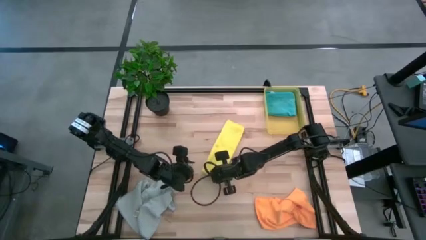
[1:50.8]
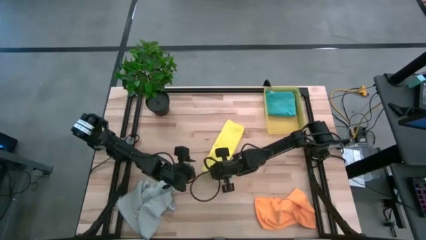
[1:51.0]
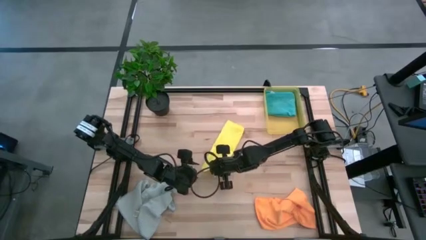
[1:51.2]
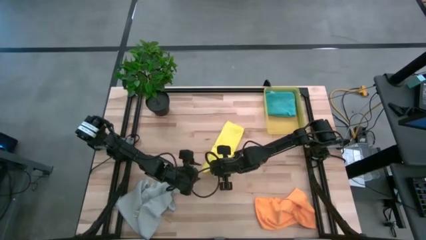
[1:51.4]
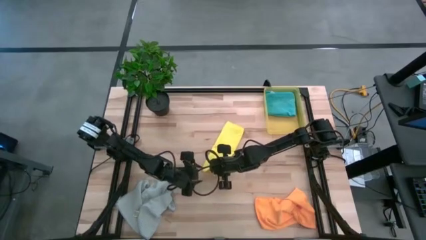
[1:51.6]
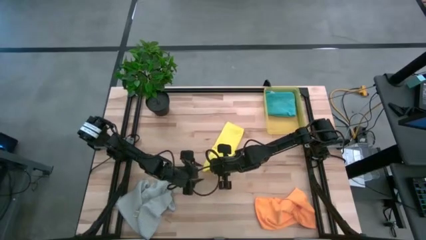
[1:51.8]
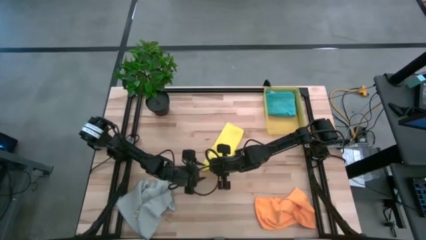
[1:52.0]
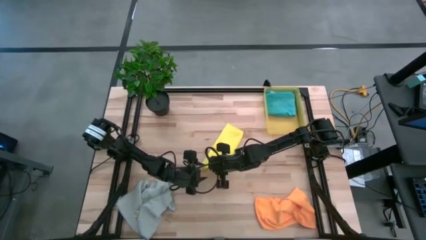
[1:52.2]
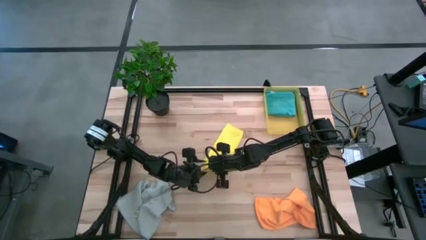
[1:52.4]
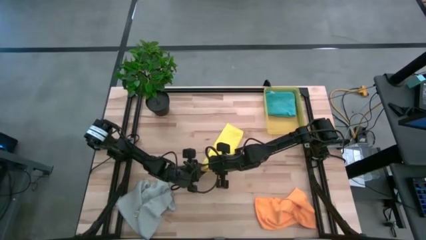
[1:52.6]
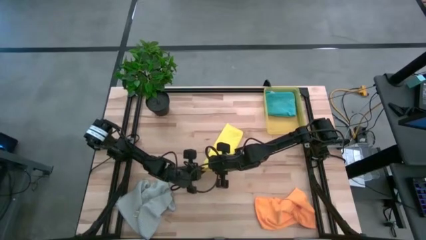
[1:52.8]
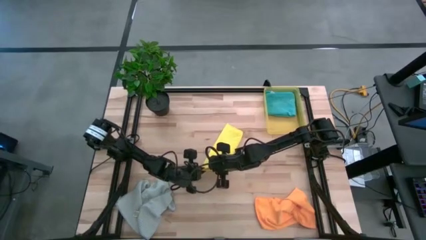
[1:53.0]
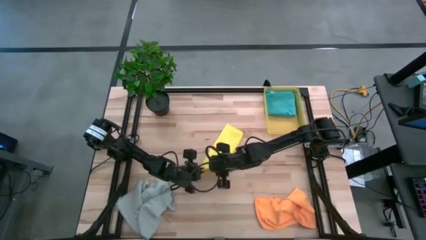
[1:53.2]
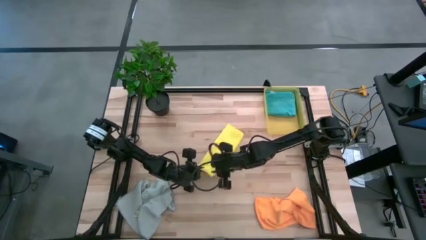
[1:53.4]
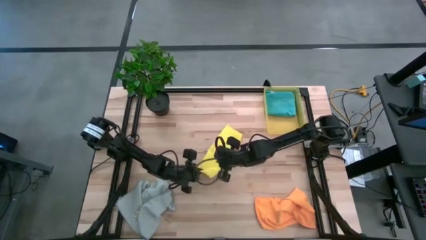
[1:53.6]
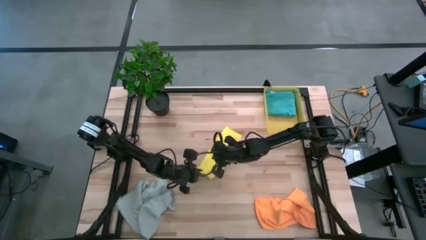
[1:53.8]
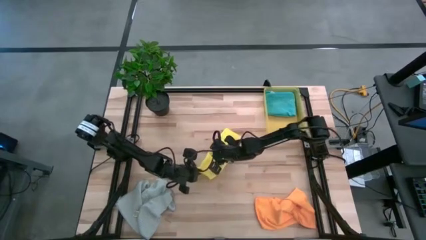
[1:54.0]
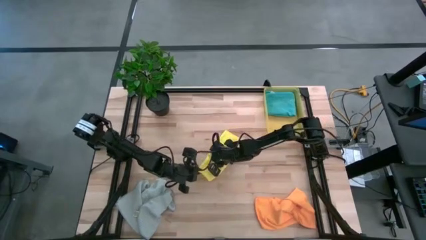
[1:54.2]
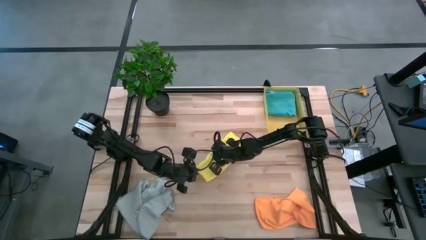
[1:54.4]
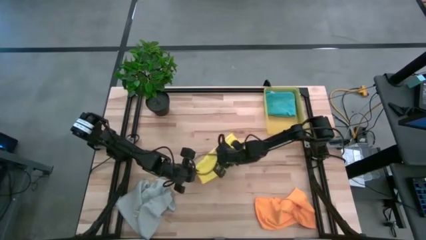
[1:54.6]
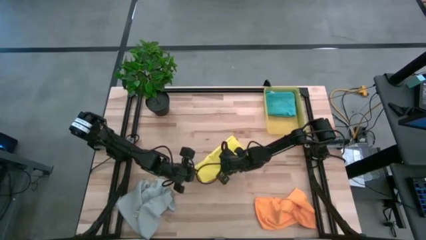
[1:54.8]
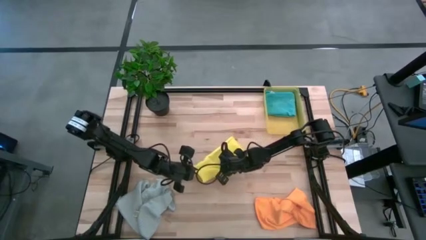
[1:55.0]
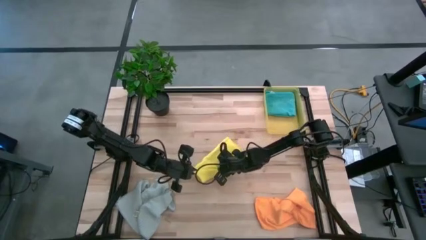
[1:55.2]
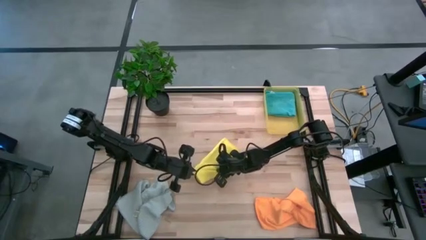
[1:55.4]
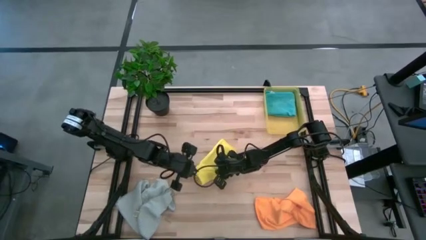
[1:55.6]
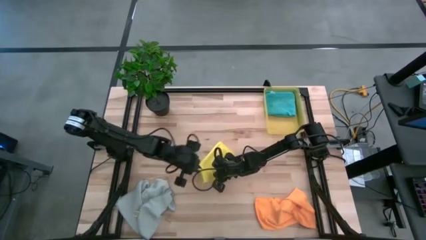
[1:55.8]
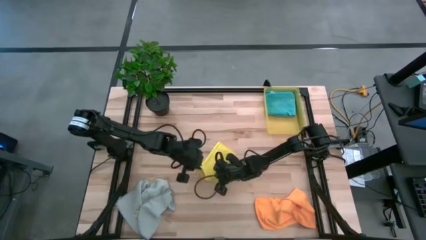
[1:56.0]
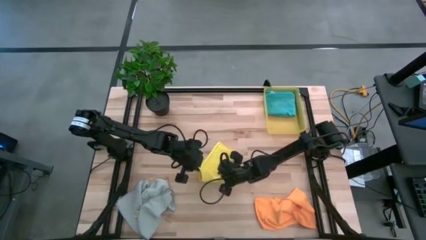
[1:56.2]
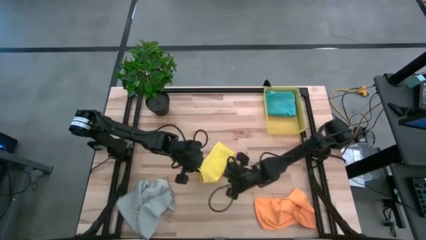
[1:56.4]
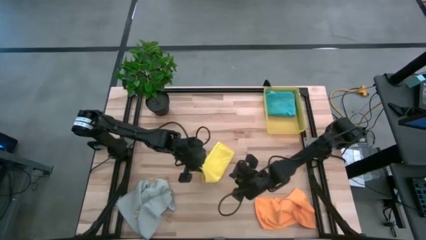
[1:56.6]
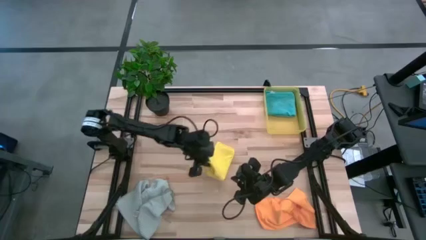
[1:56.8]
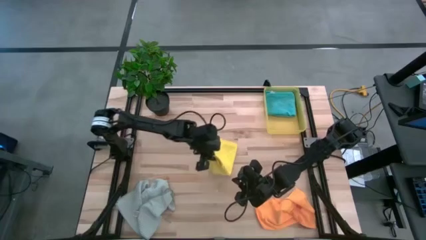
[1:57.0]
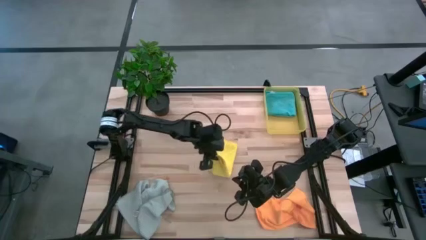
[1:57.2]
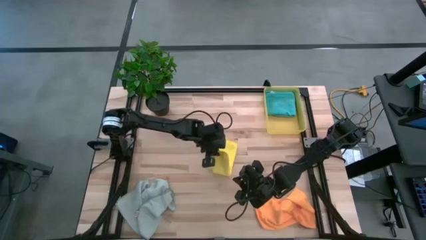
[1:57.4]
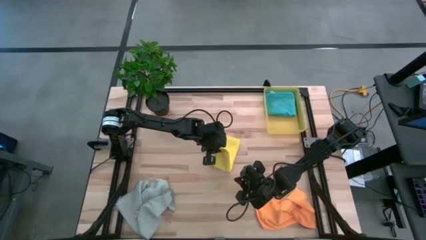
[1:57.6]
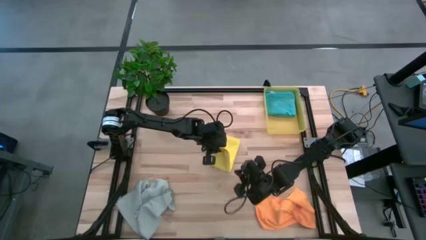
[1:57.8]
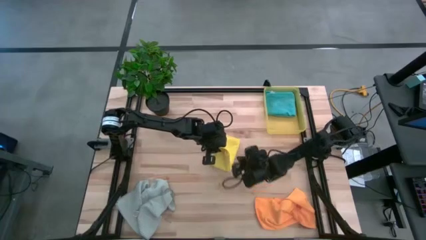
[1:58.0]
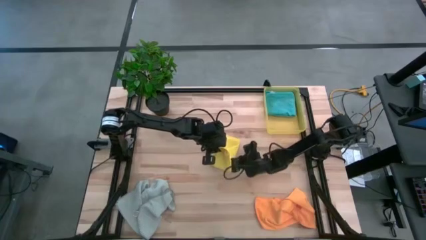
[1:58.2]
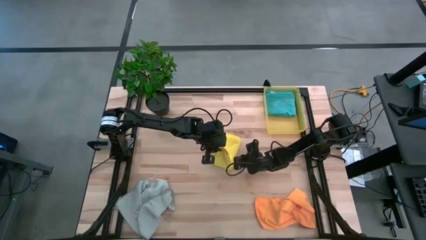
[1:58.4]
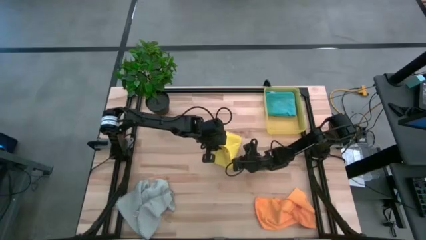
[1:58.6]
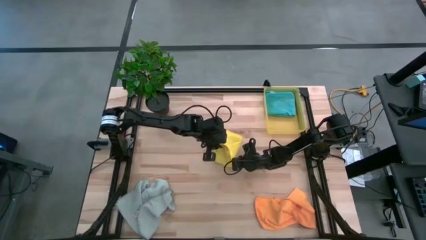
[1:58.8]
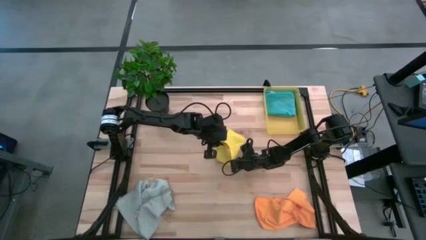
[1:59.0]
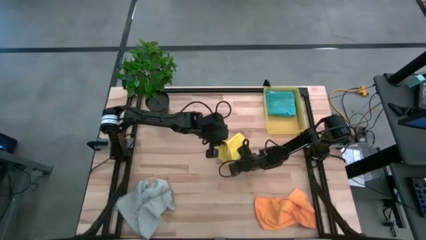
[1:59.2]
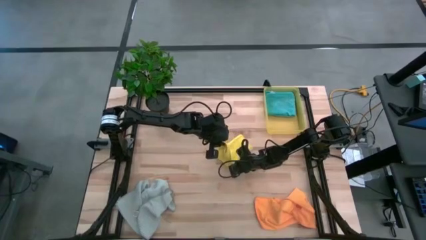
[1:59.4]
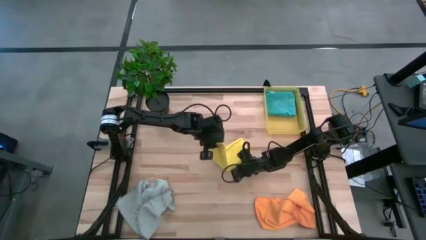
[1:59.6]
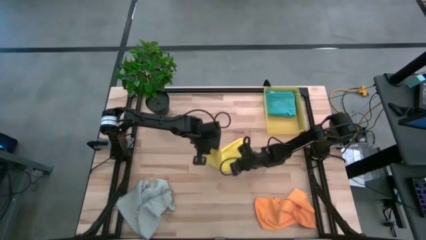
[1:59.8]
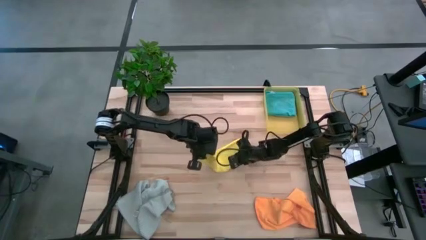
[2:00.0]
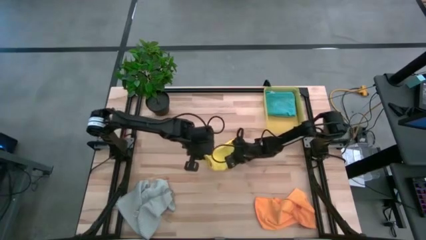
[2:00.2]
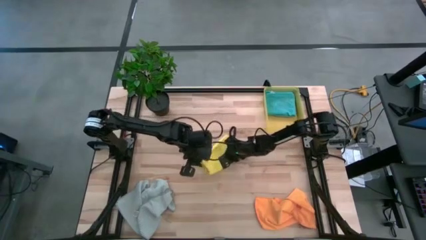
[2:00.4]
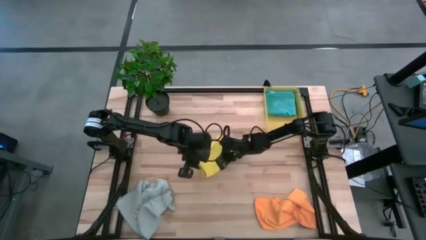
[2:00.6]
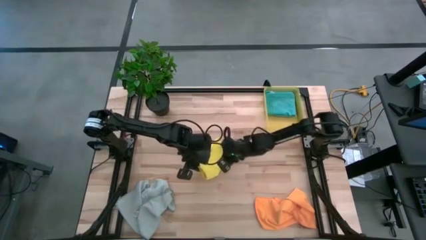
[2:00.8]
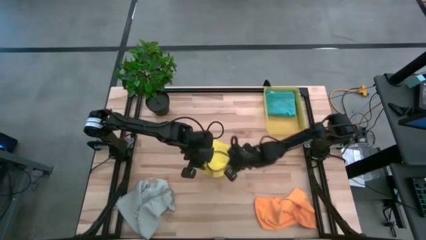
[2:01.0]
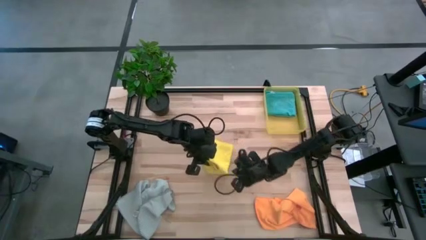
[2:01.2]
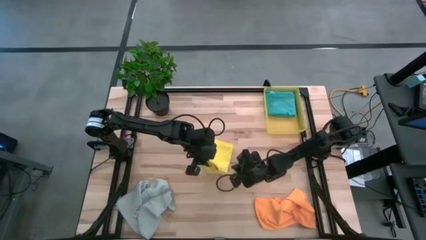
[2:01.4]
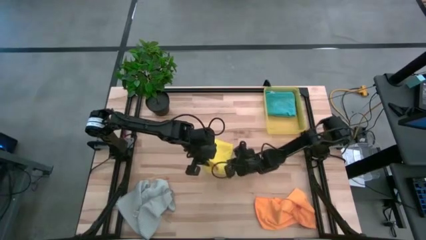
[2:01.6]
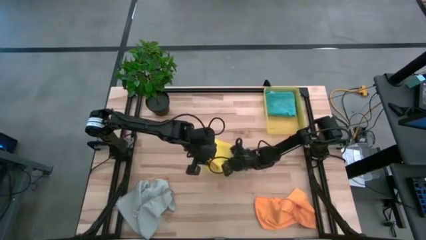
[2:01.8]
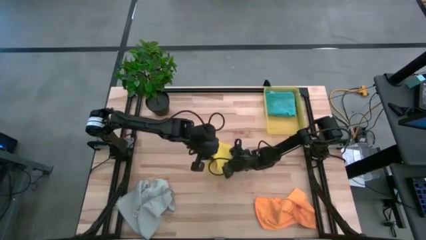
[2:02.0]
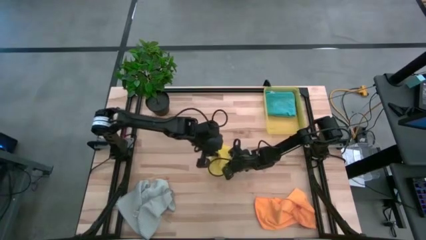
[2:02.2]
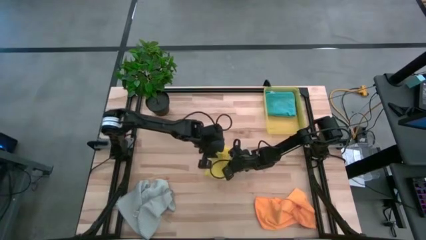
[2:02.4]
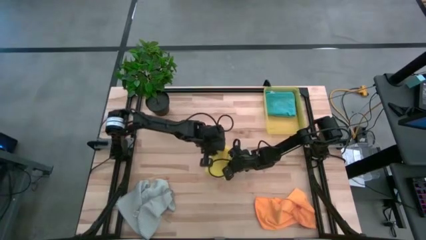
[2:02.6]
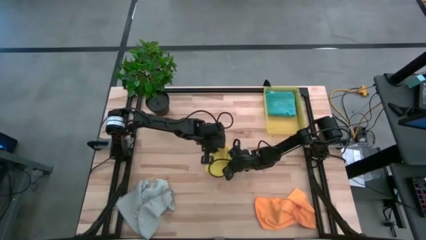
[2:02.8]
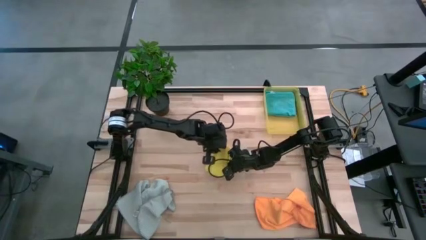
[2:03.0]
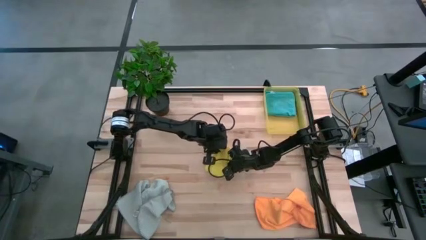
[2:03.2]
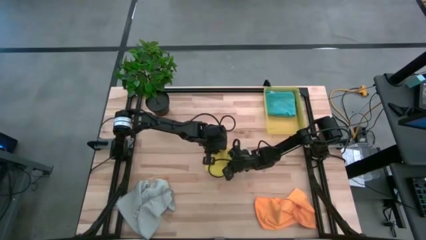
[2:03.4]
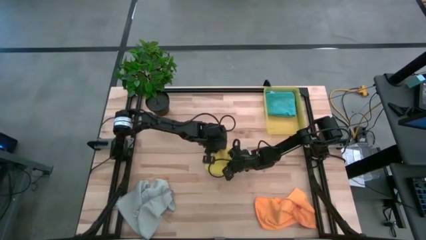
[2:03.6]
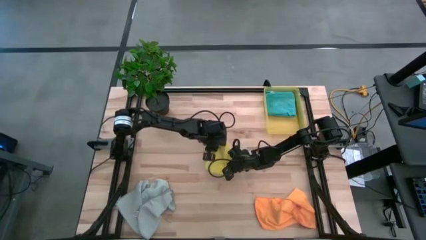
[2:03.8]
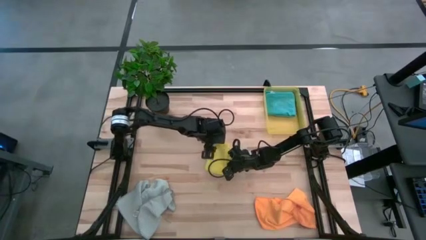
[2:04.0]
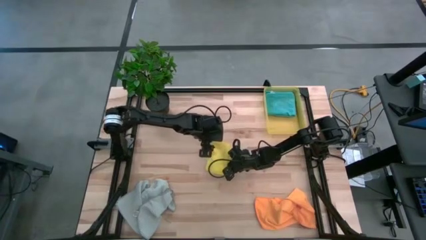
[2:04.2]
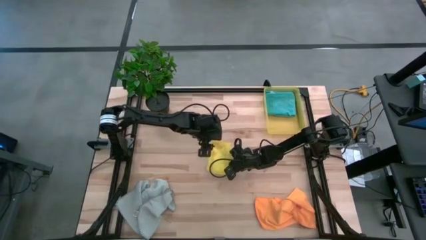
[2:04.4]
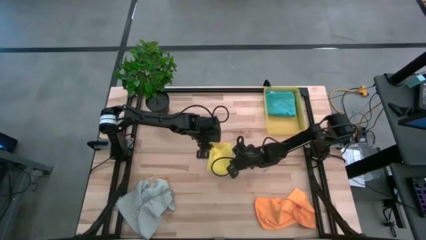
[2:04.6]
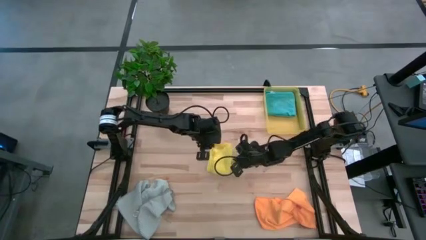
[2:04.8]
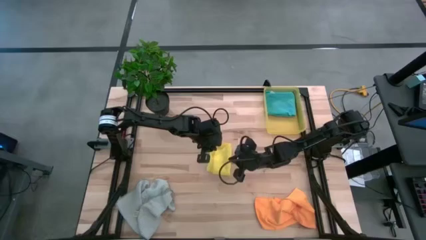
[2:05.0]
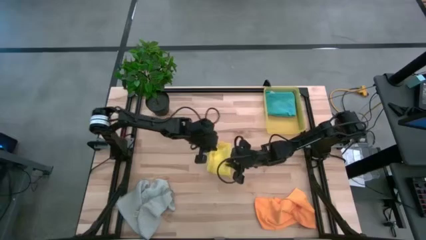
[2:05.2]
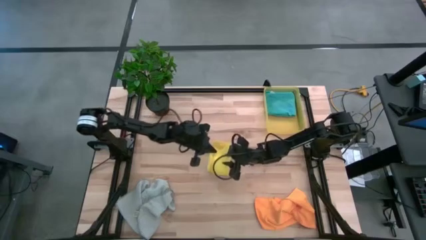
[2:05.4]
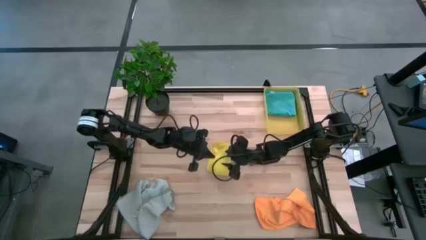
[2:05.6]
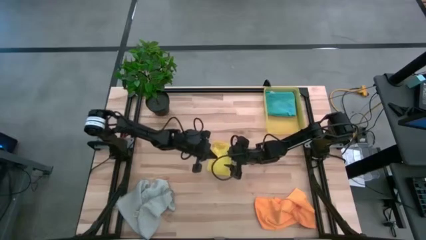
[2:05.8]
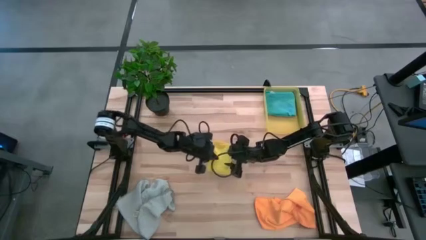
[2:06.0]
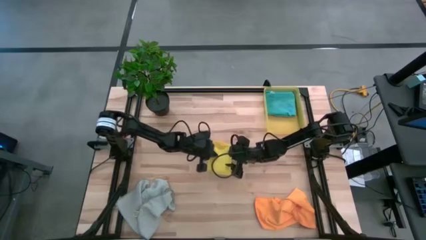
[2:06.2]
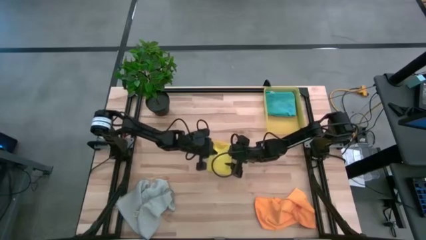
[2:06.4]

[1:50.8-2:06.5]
Task: Fold microfiber towels
Fold the yellow microfiber towel
